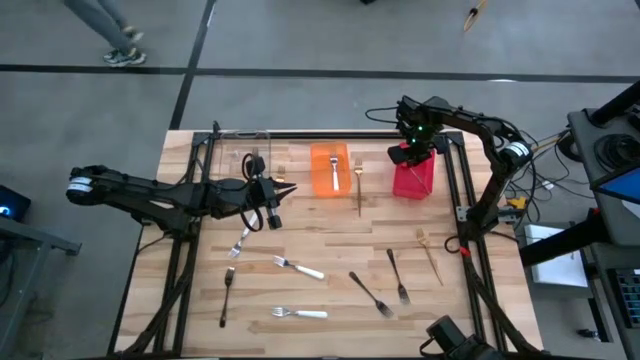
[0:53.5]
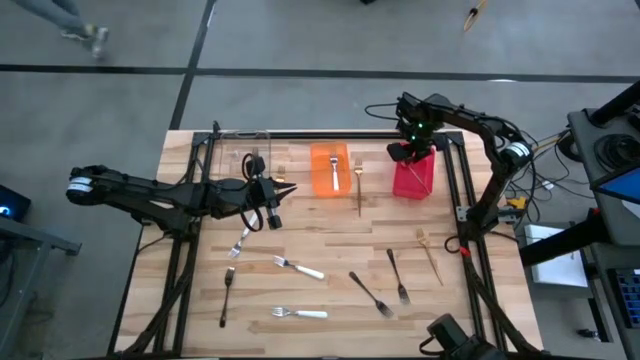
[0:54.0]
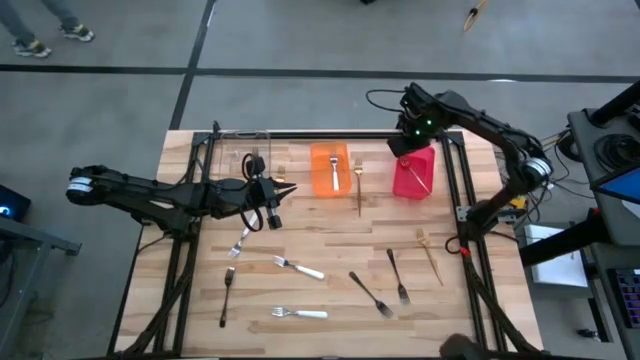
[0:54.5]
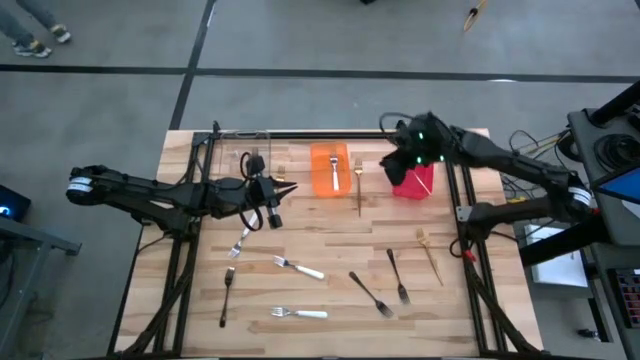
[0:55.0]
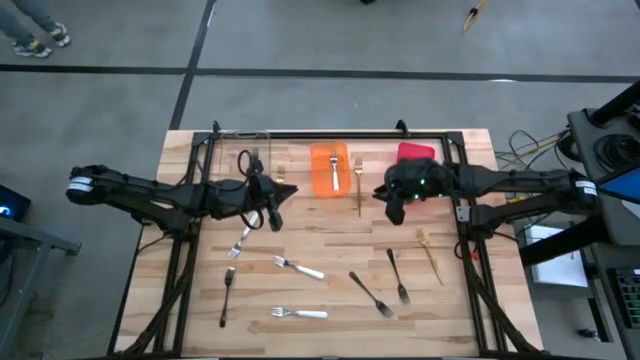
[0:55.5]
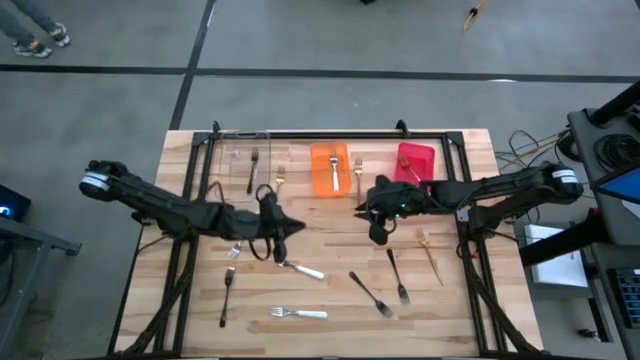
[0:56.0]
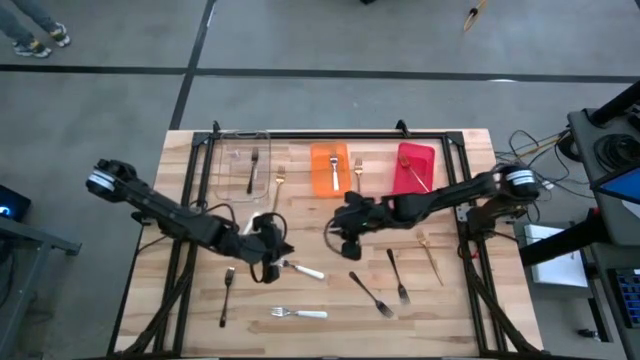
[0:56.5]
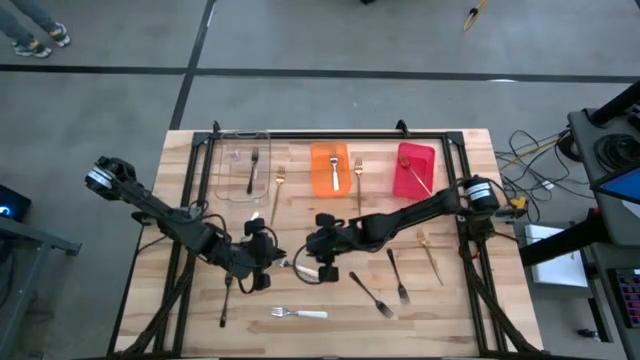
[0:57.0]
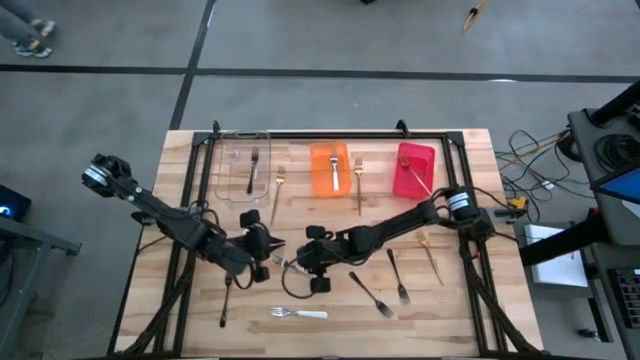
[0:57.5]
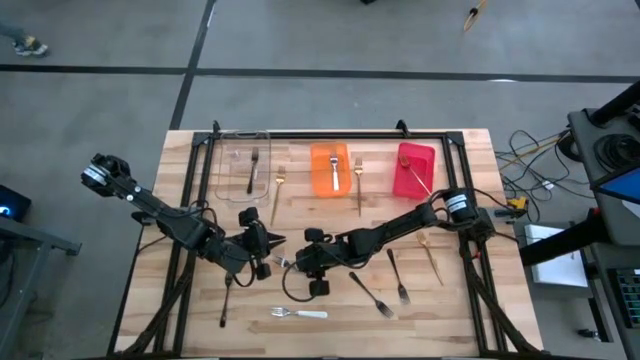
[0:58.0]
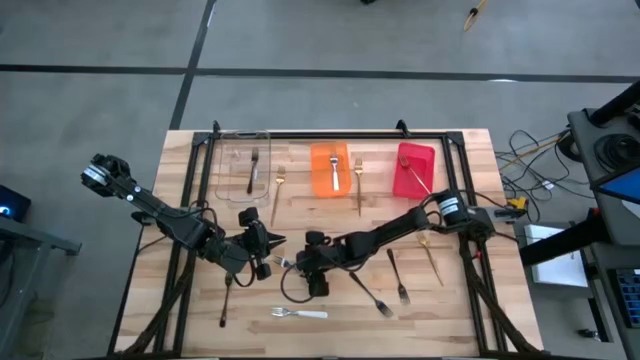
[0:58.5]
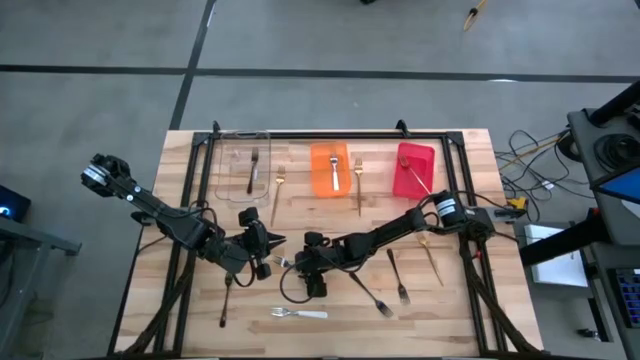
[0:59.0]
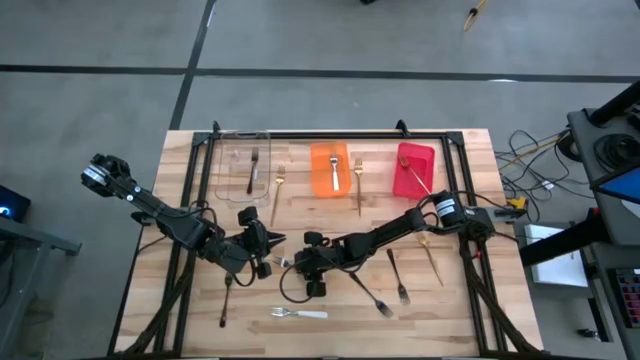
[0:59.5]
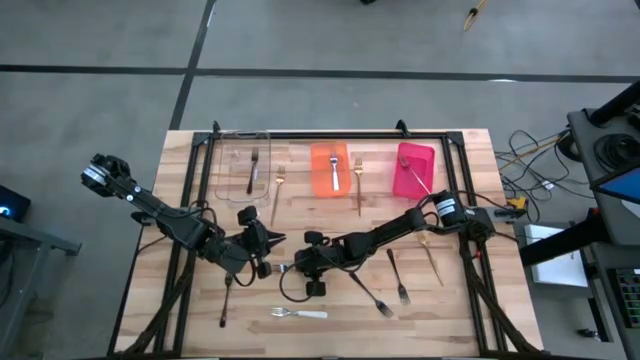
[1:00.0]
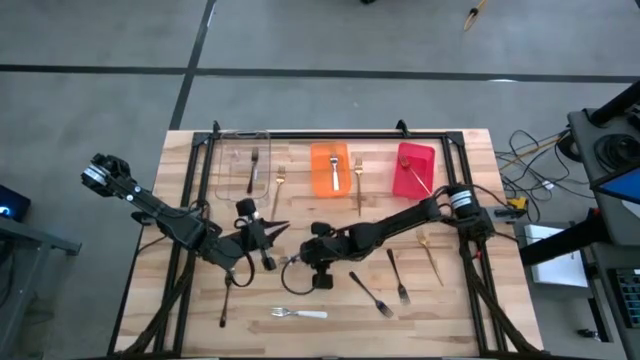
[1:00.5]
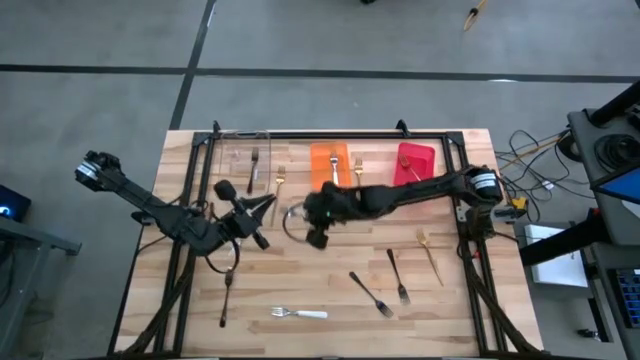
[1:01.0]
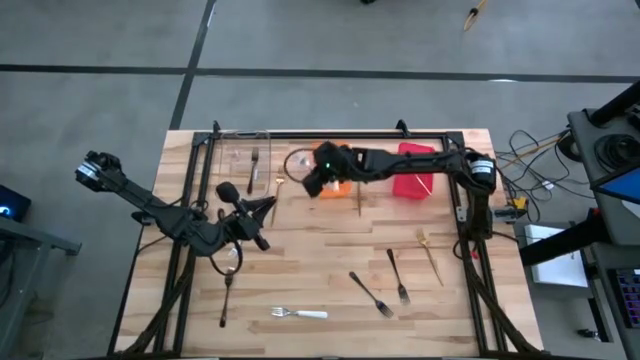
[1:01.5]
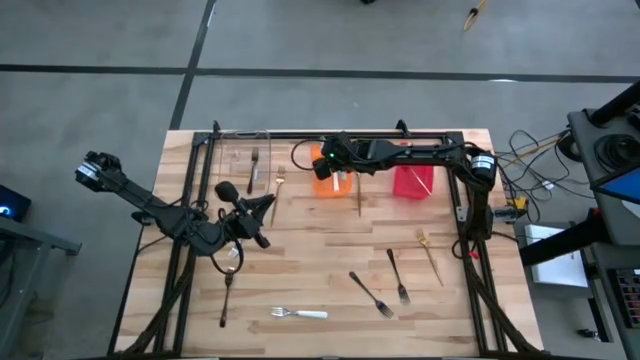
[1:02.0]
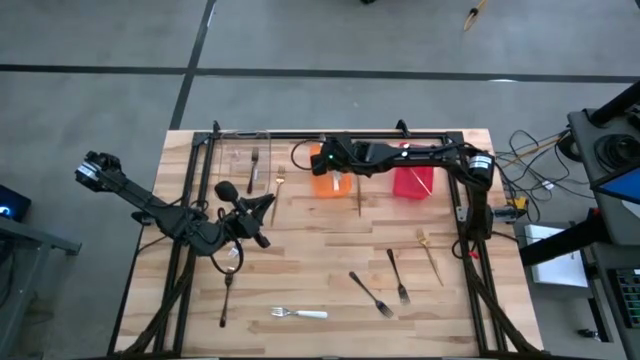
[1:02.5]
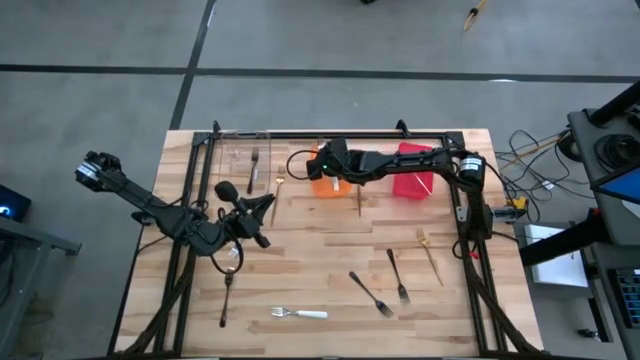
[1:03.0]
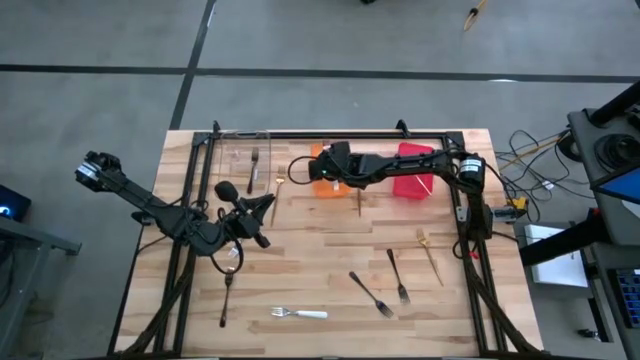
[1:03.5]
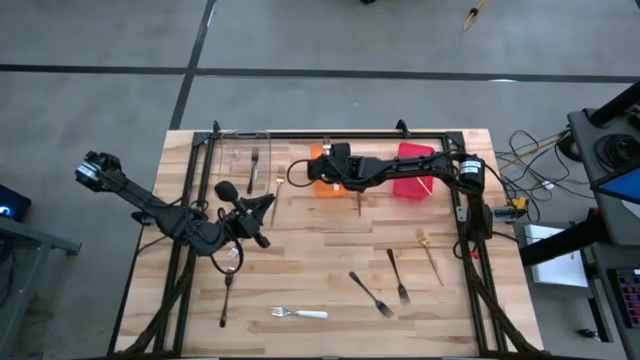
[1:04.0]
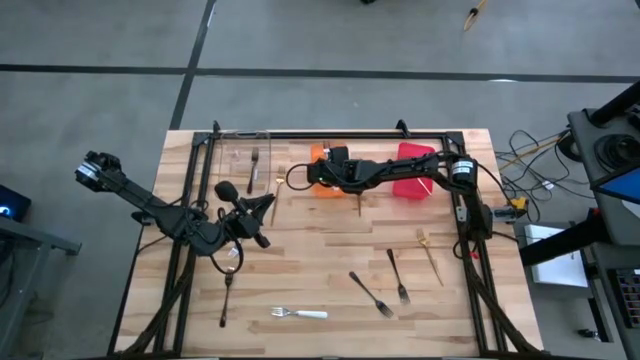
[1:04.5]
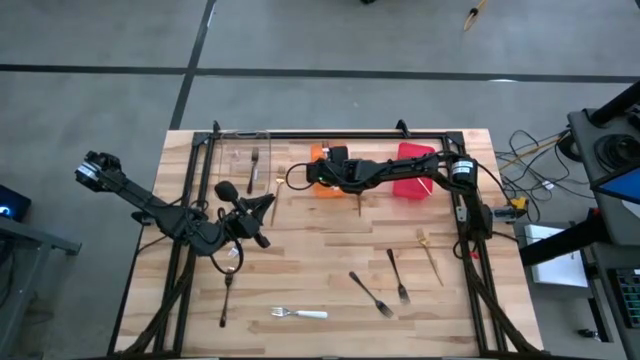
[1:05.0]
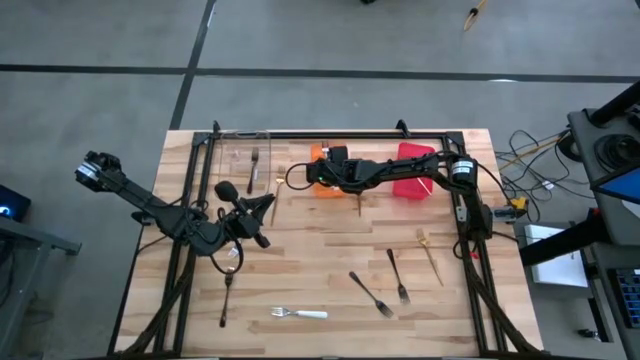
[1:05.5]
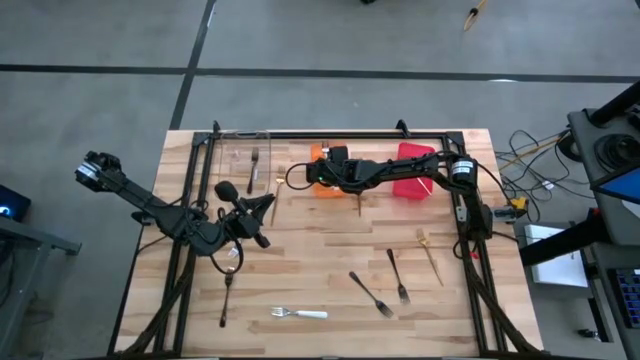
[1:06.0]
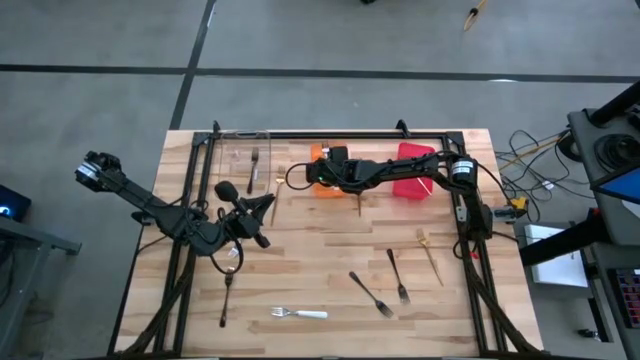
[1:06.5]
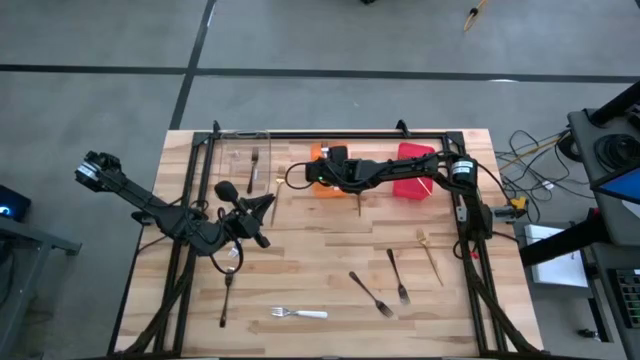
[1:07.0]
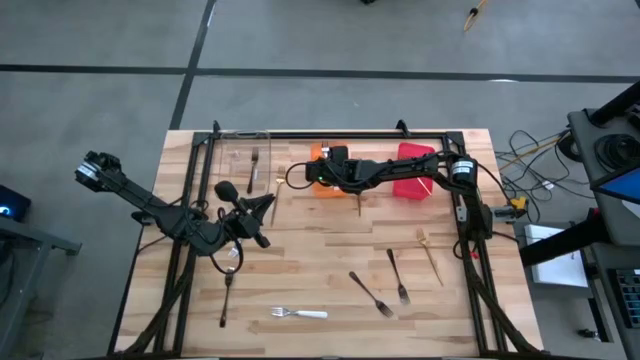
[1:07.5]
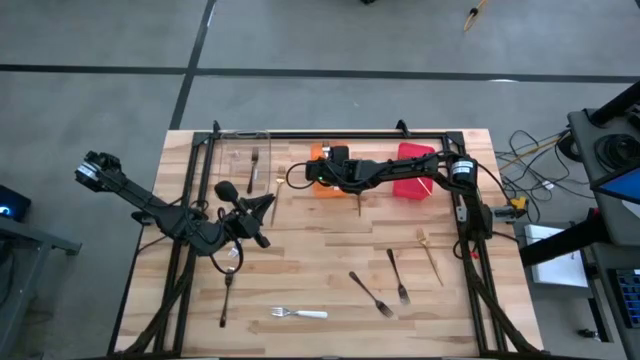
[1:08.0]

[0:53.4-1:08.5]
Task: Sort silverware by color (type)
Put the center white fork into the orange bin
